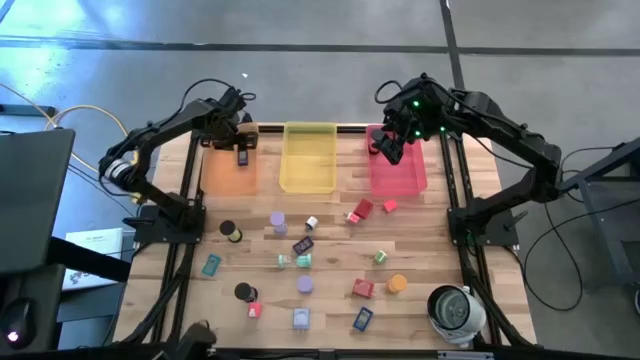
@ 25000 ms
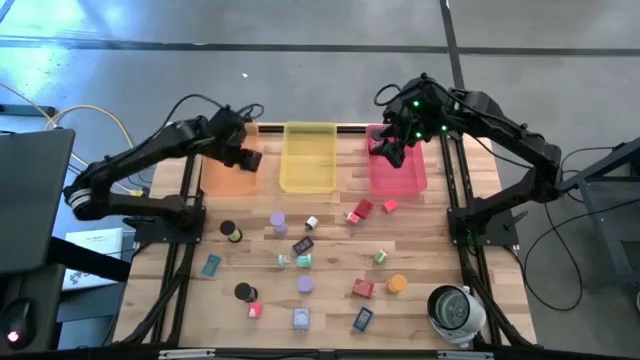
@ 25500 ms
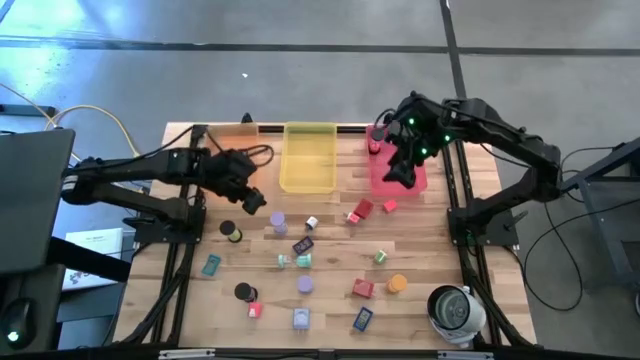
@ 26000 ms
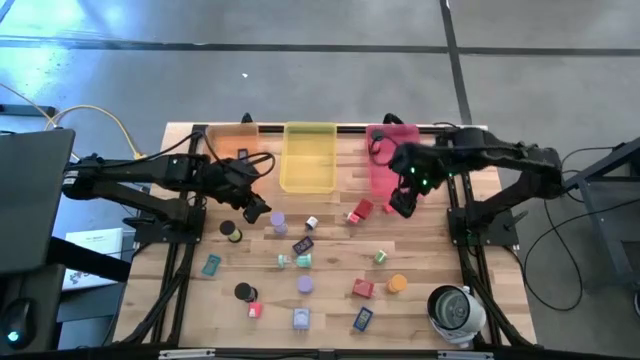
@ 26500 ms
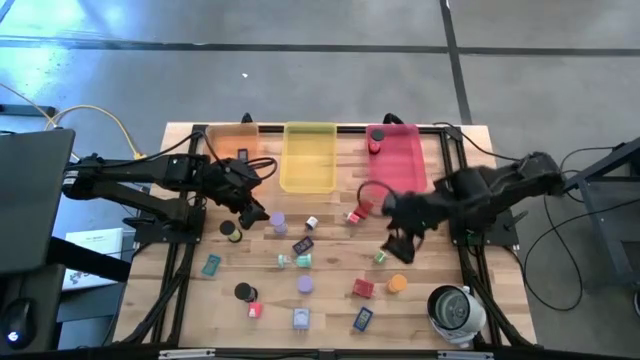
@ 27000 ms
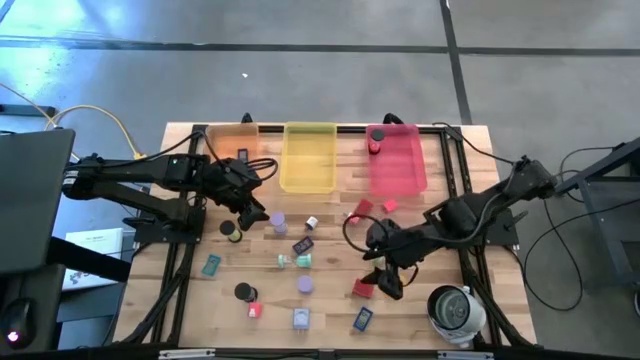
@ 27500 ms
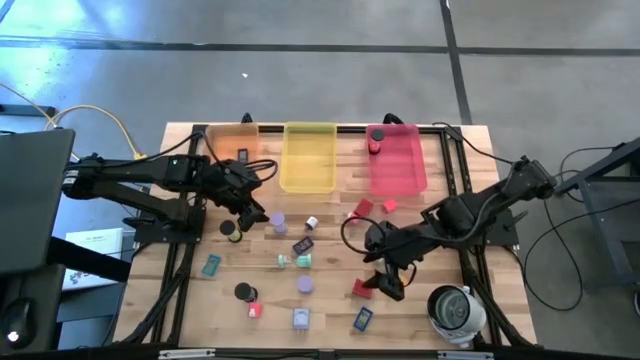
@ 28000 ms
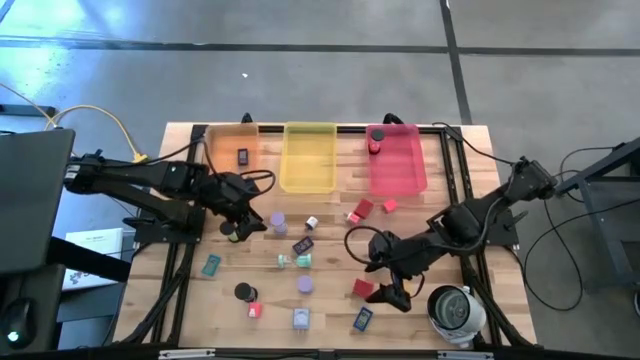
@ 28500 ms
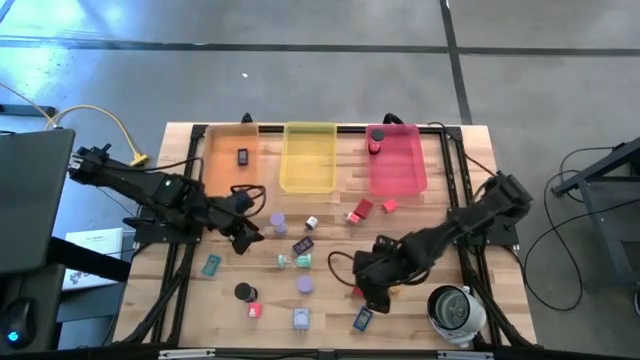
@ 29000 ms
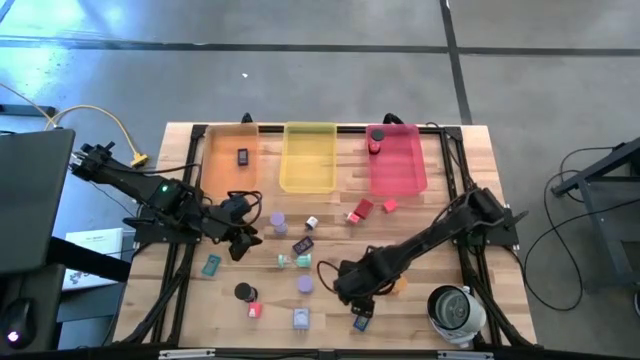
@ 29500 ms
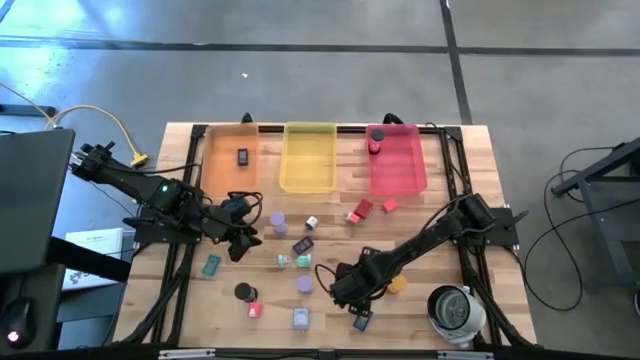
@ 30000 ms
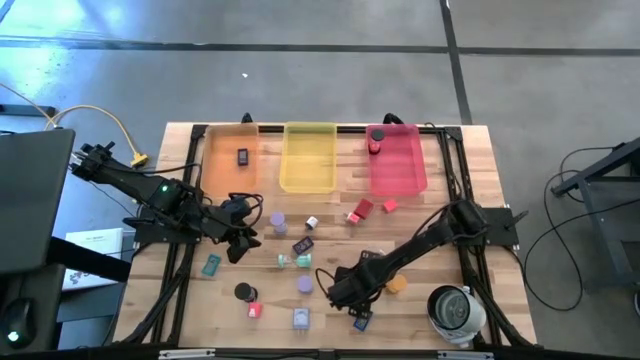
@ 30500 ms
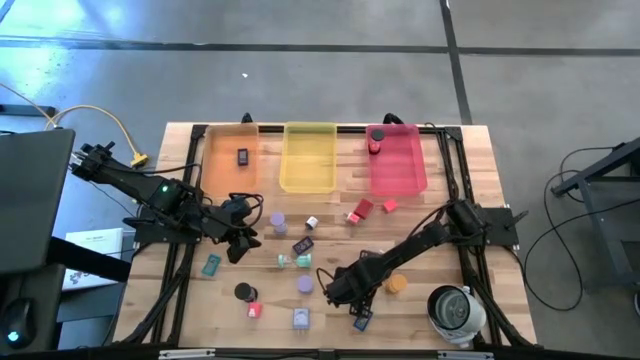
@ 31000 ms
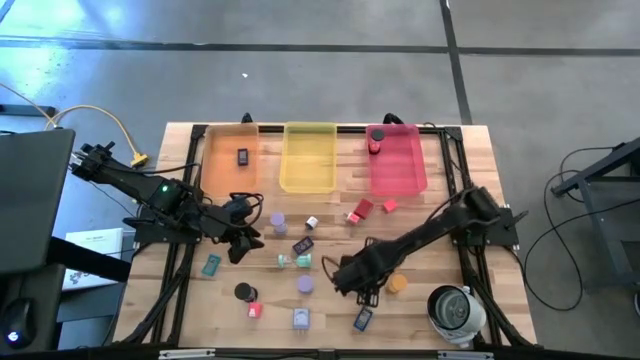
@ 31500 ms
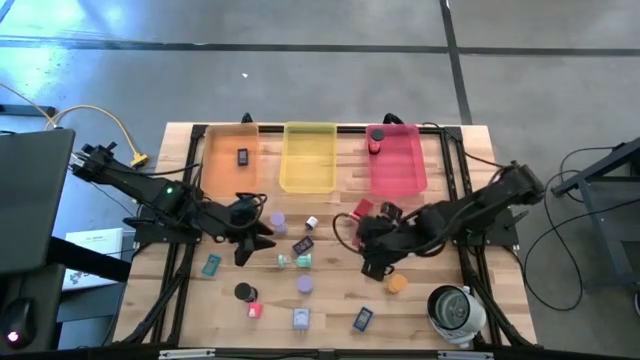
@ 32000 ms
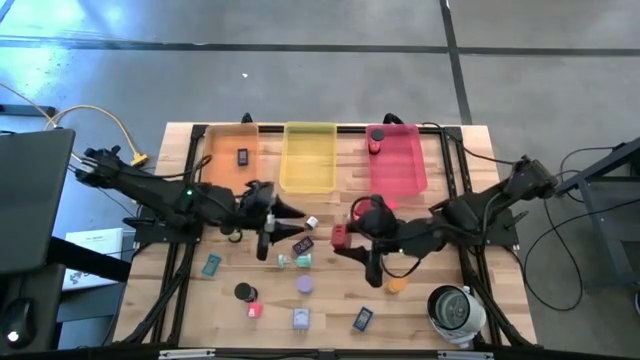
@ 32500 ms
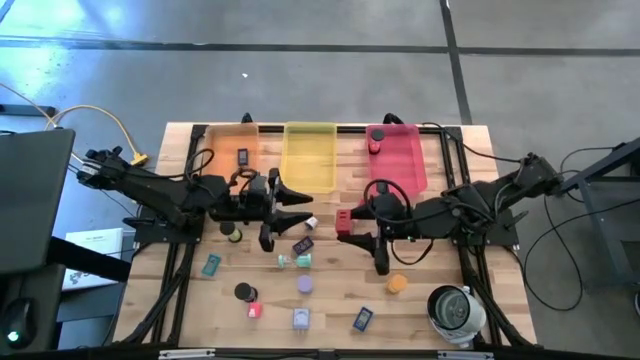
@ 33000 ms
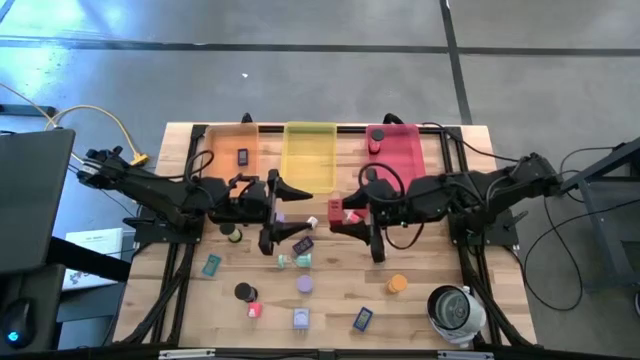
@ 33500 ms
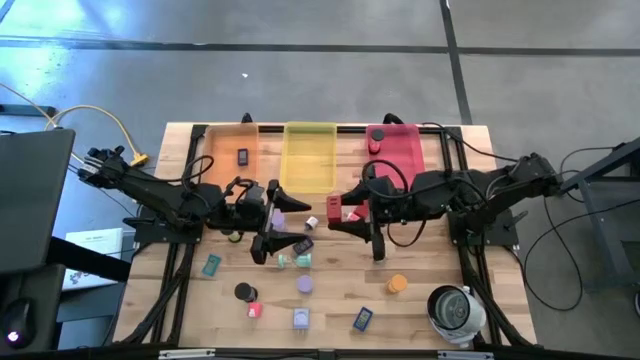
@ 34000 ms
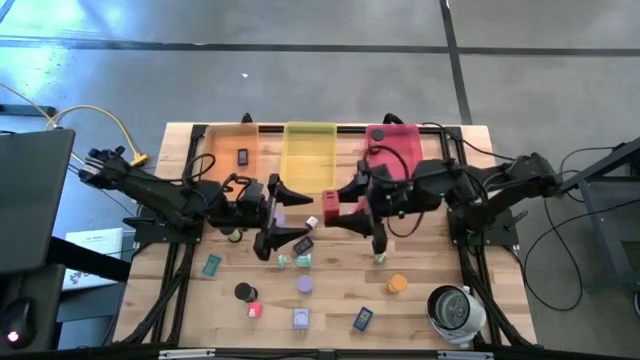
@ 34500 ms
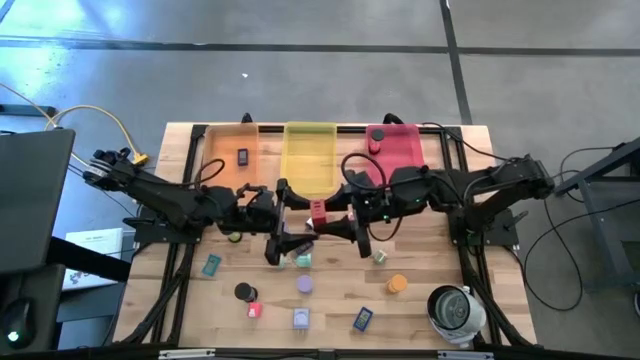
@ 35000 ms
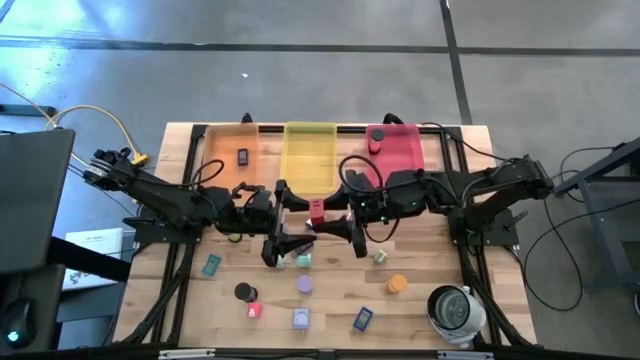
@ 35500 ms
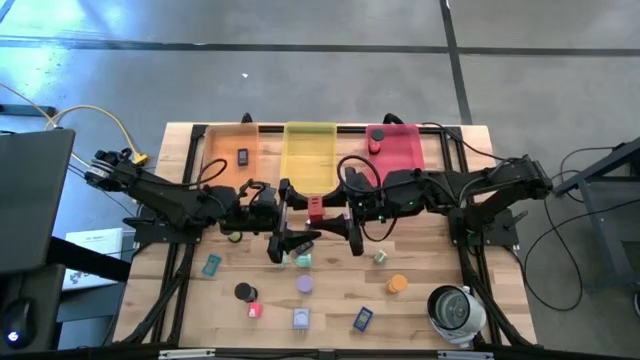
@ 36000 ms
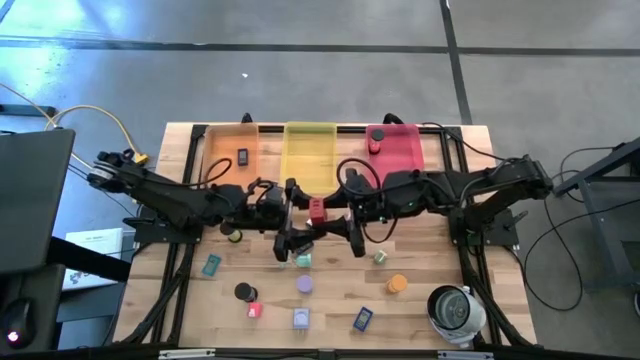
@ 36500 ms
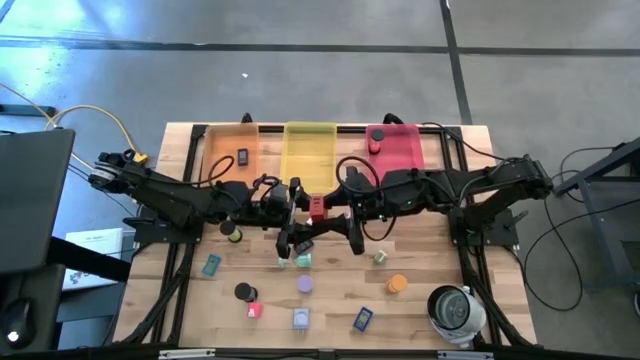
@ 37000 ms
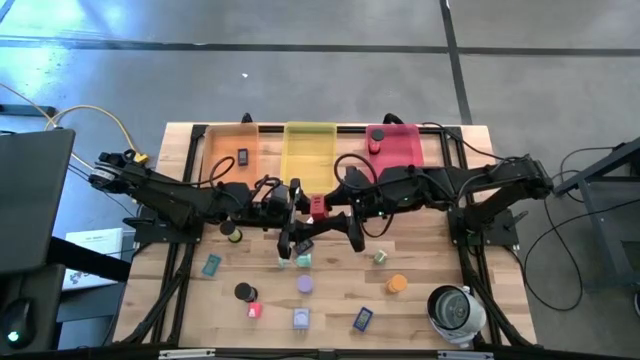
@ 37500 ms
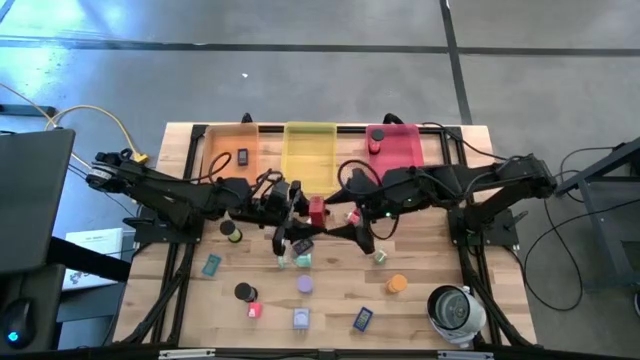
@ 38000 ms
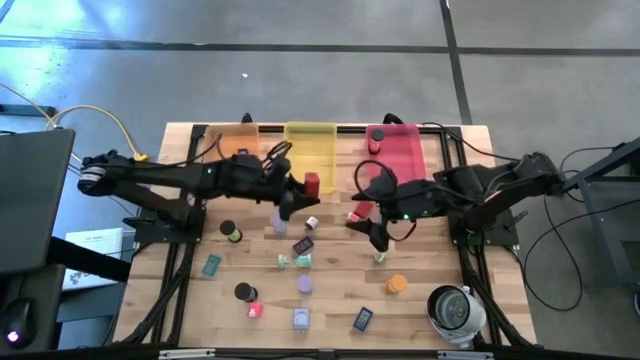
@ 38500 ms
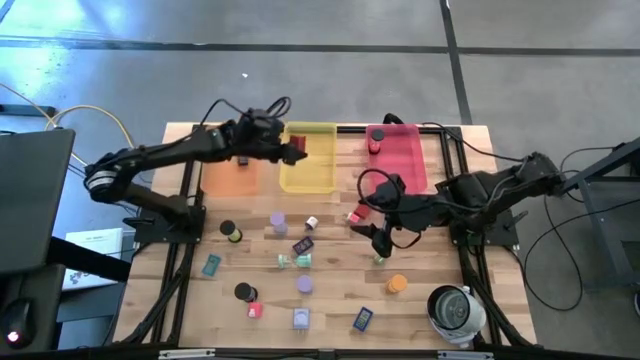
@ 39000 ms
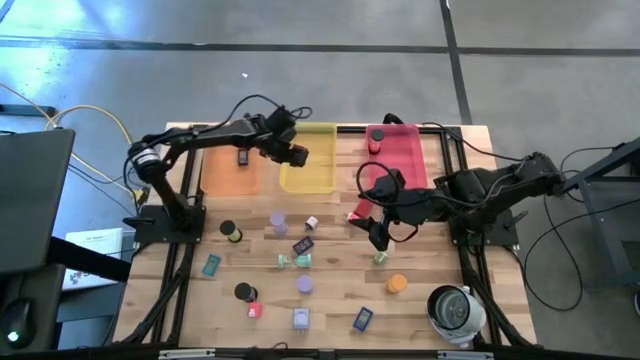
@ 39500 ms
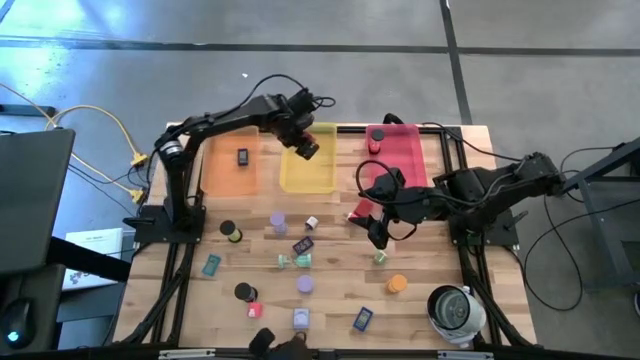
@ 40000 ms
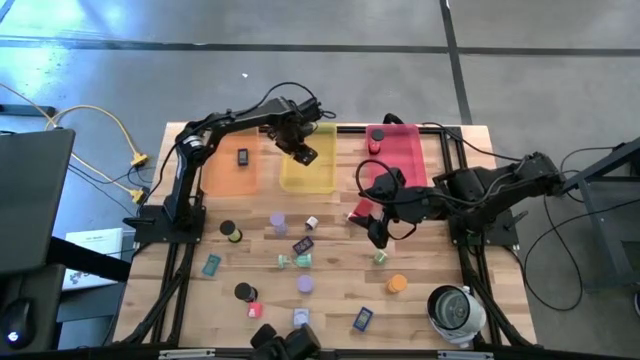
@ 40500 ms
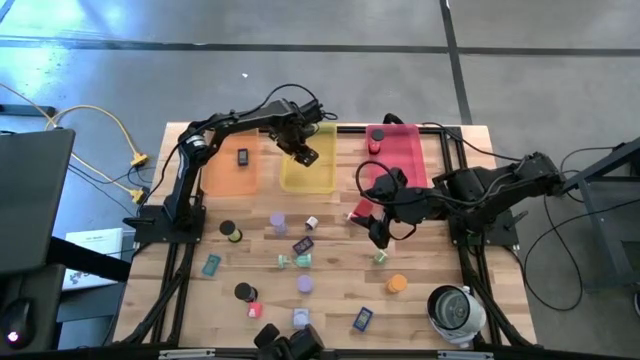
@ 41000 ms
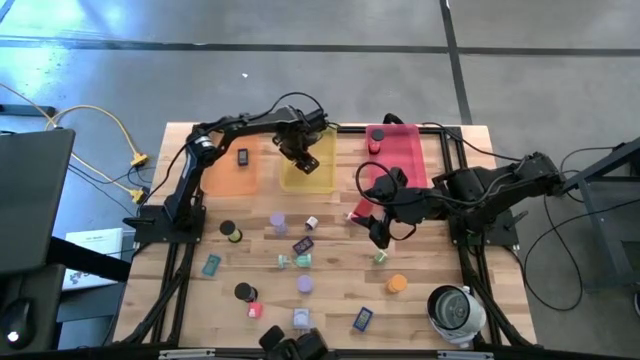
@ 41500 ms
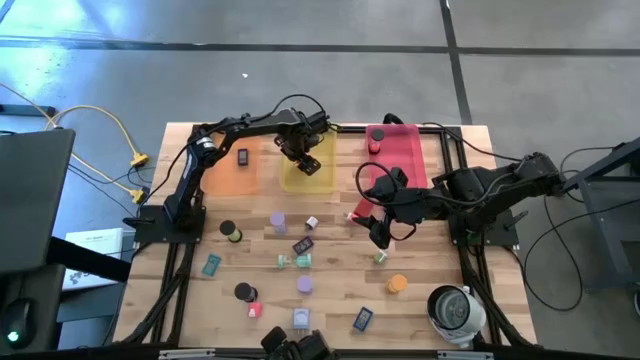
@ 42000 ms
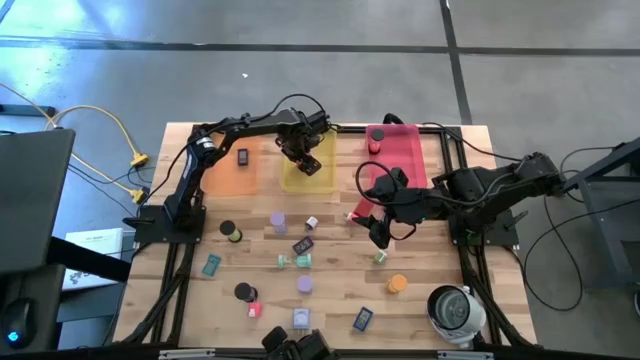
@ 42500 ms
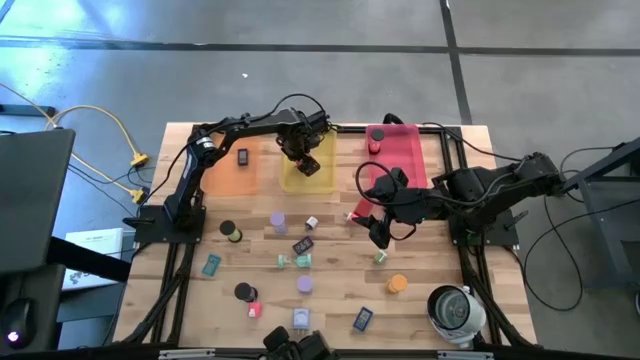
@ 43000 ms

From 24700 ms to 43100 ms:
Task: Pick & Place Office items
Put the bottom red charger adapter into the yellow bin
